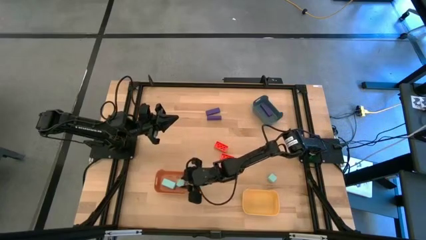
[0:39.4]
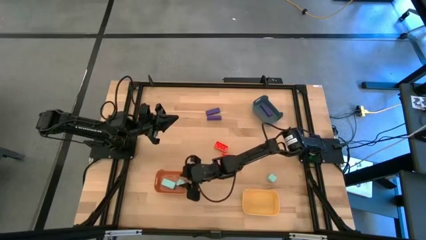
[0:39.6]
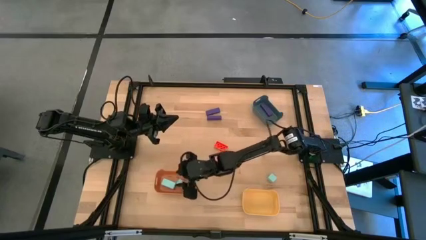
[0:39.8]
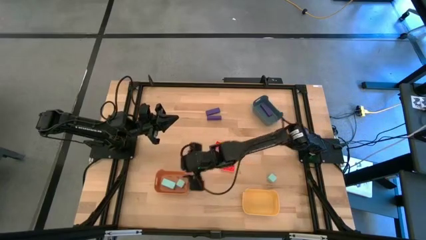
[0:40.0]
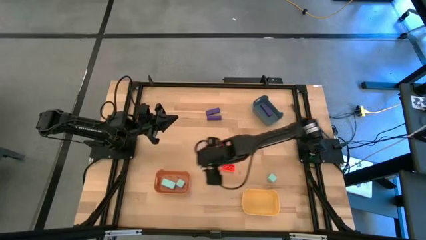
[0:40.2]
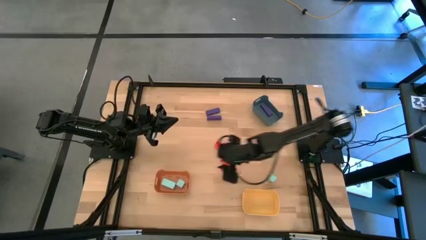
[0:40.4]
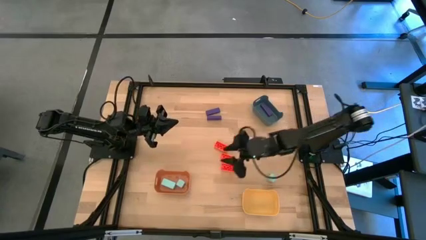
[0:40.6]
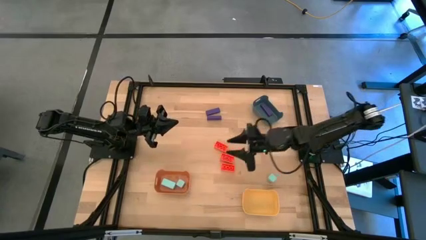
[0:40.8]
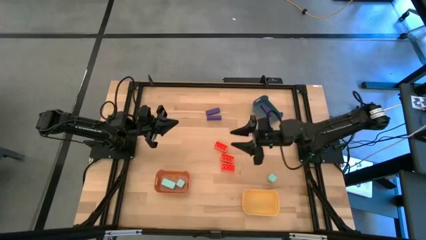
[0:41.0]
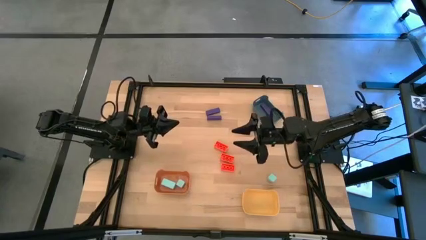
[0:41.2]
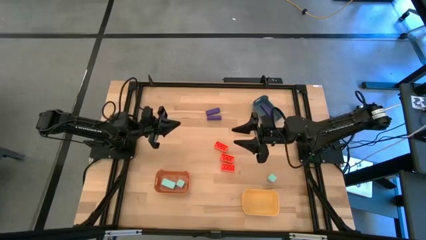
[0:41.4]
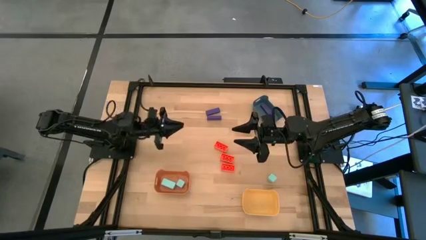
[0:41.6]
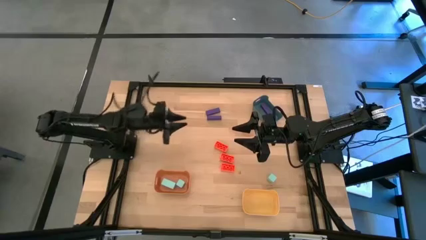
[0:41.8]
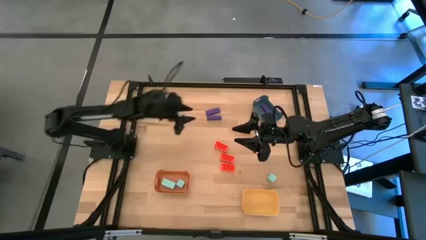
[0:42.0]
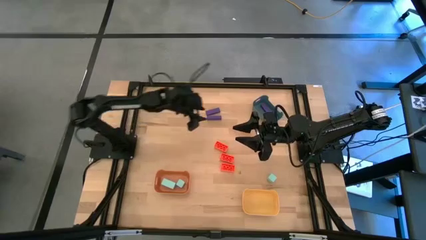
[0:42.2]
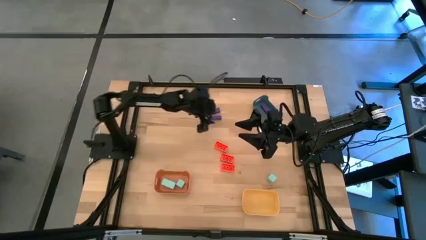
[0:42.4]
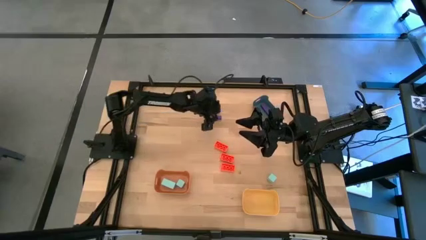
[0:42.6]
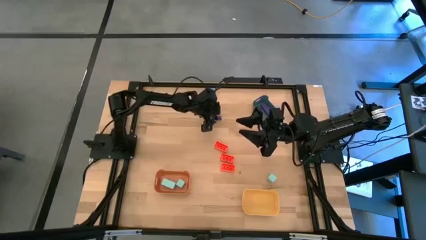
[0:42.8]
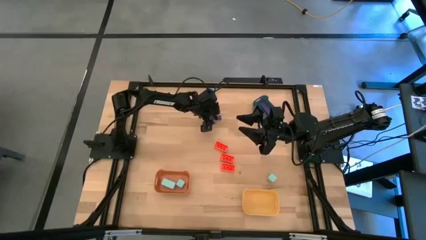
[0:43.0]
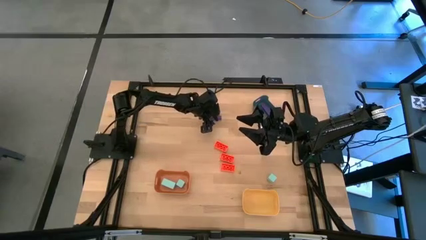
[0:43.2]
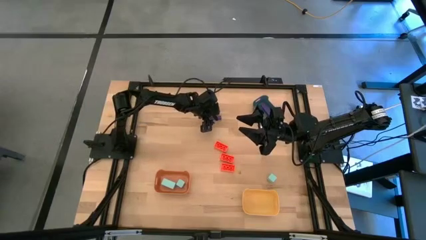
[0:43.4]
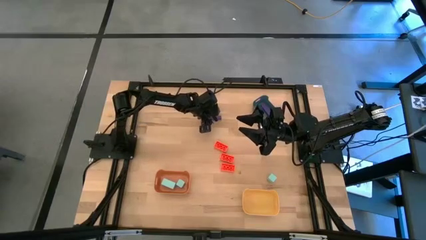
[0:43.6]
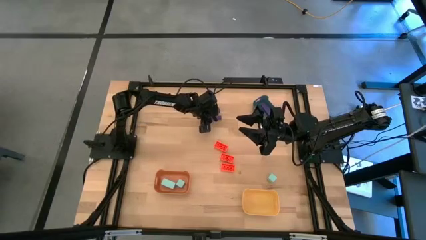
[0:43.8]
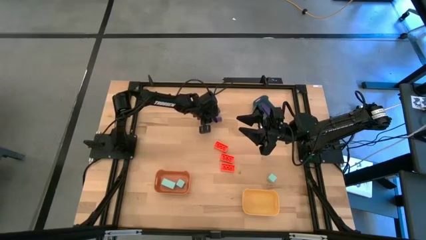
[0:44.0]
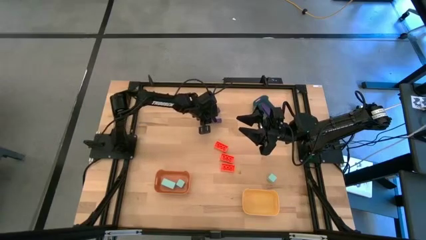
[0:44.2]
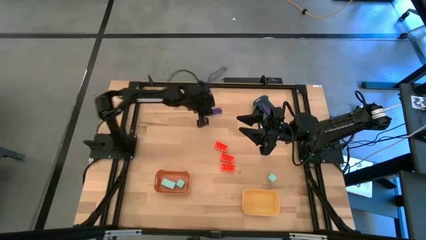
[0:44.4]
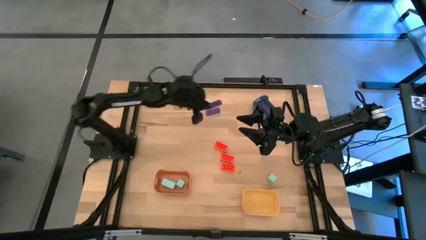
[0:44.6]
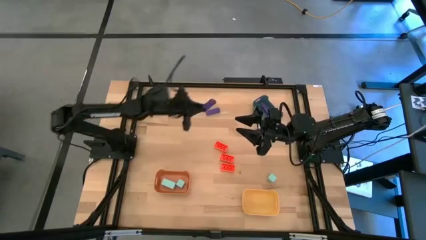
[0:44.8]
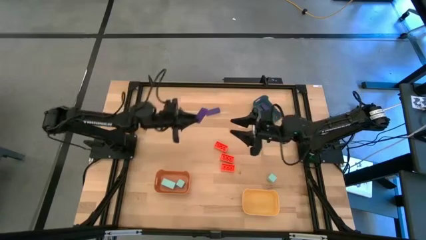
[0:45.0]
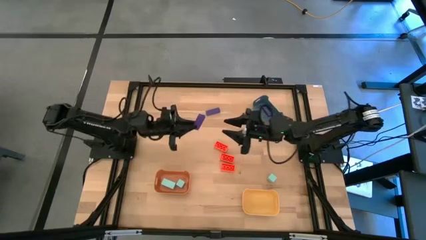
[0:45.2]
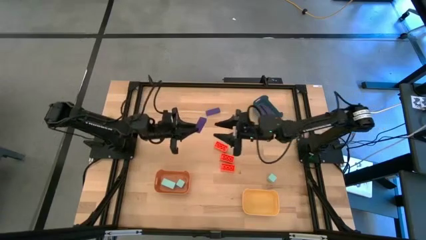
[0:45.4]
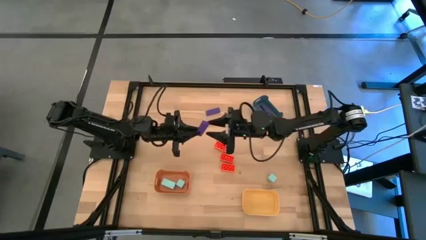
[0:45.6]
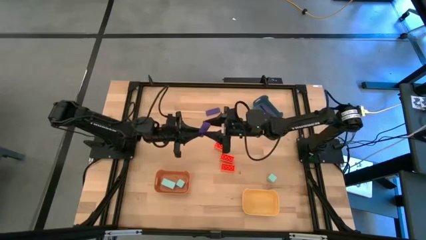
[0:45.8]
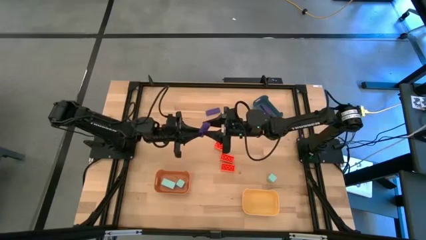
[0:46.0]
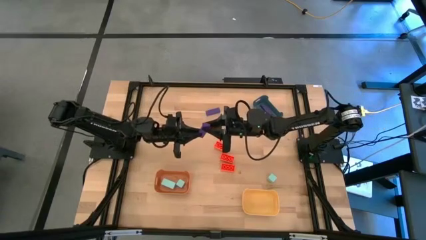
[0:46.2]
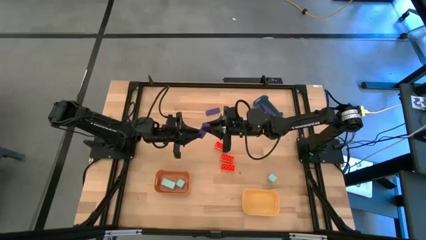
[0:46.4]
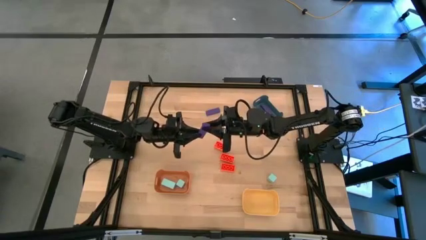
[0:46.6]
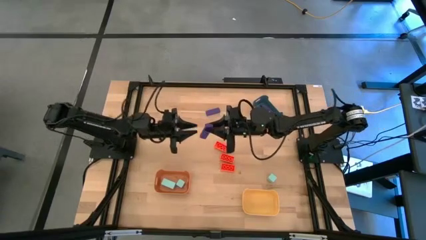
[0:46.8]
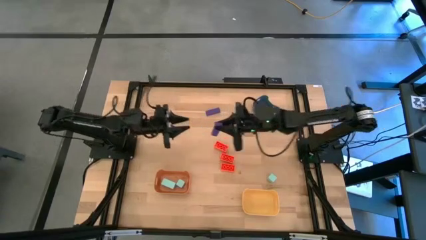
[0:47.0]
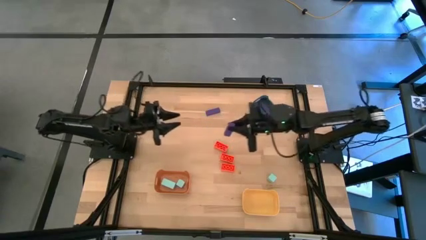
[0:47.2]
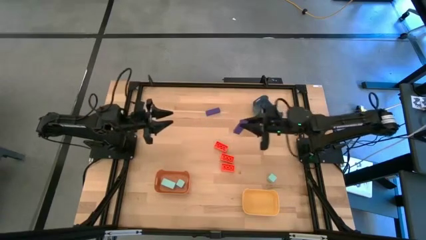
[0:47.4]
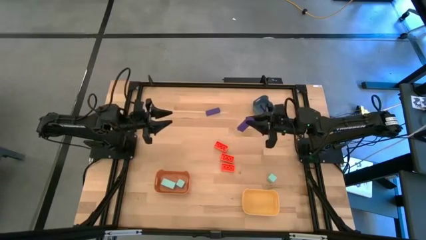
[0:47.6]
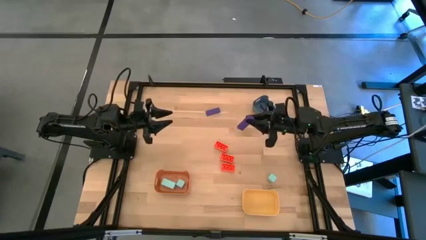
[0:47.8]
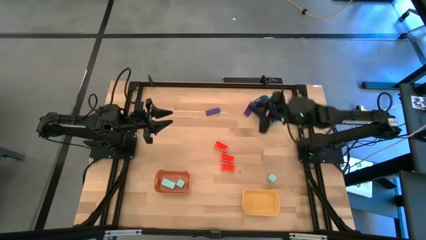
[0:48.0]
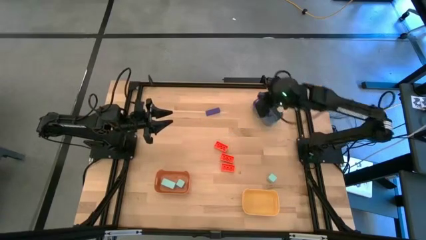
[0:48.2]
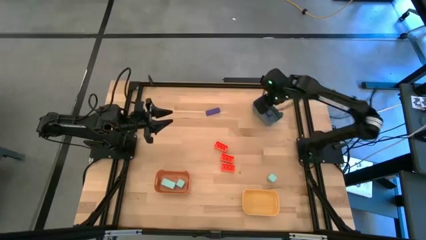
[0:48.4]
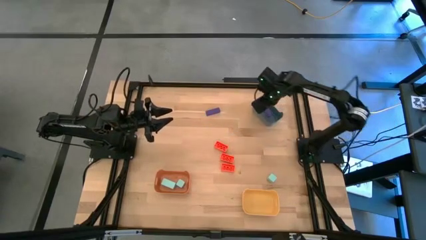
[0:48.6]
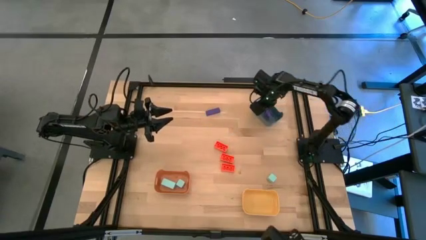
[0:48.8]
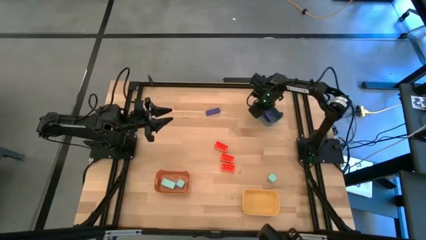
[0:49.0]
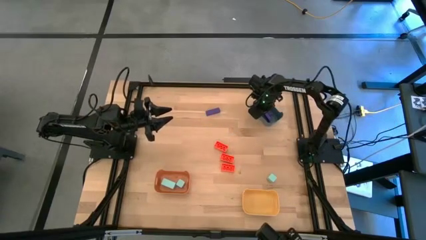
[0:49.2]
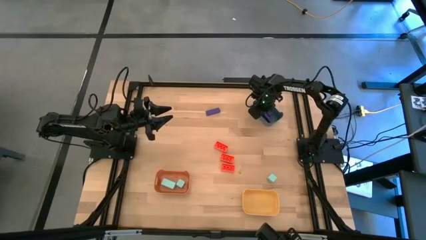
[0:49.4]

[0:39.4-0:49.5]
Task: Sort & place blocks by color
Put the bottom violet block into the gray bin
